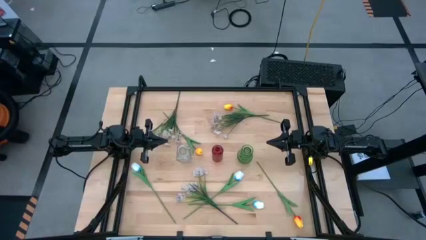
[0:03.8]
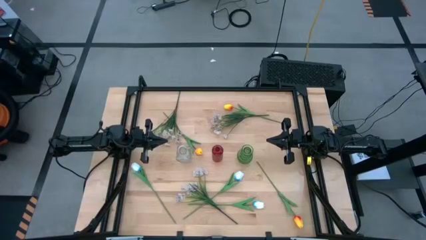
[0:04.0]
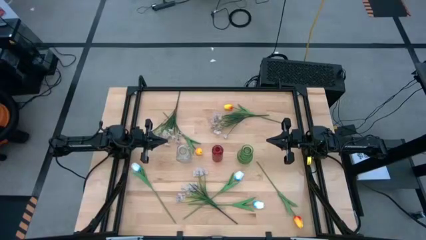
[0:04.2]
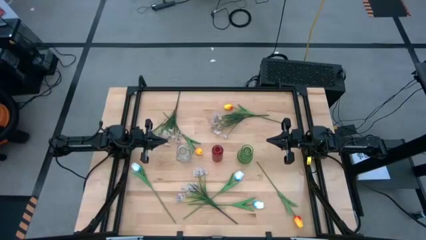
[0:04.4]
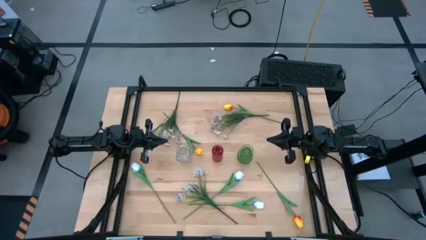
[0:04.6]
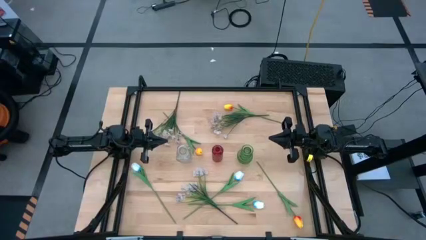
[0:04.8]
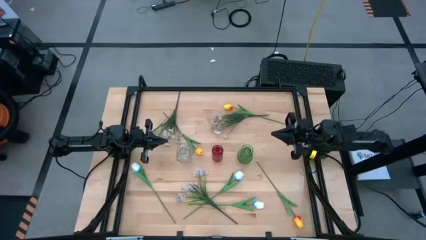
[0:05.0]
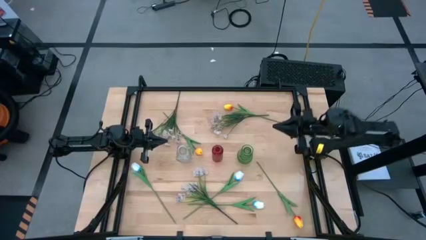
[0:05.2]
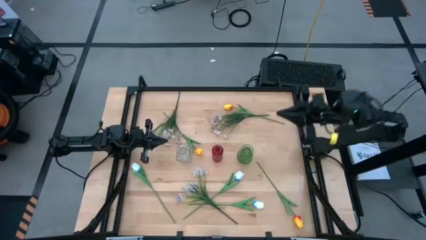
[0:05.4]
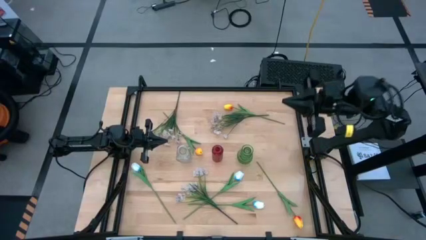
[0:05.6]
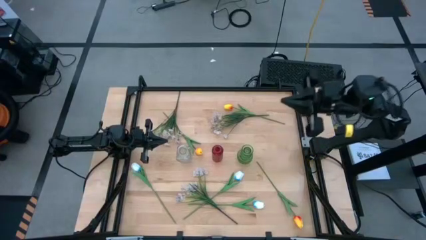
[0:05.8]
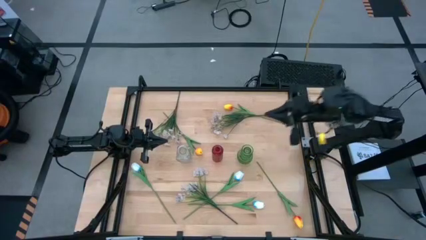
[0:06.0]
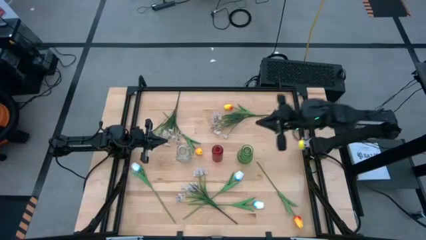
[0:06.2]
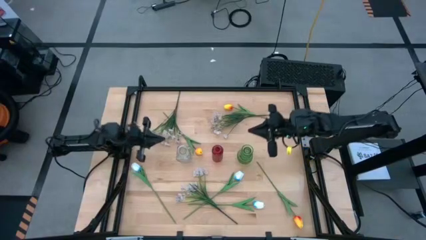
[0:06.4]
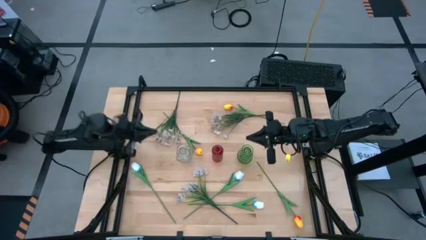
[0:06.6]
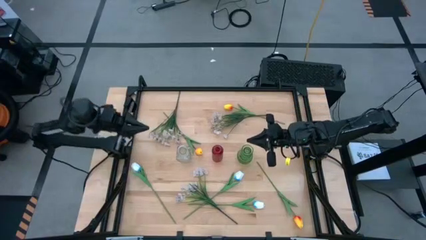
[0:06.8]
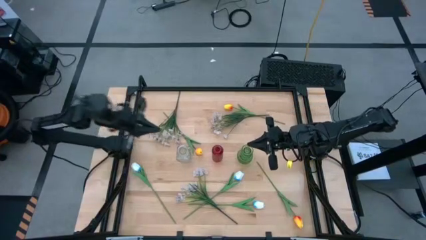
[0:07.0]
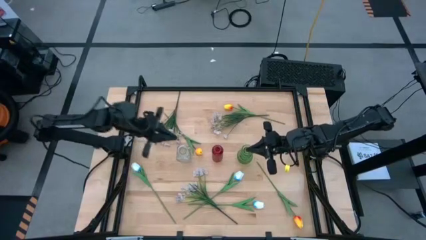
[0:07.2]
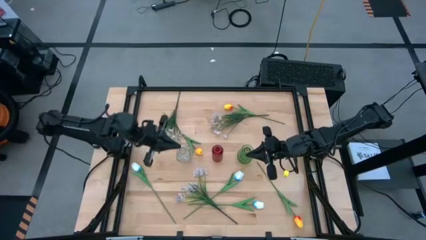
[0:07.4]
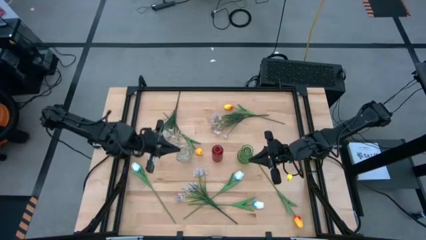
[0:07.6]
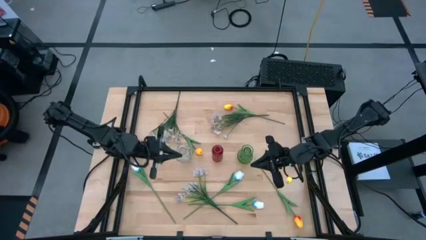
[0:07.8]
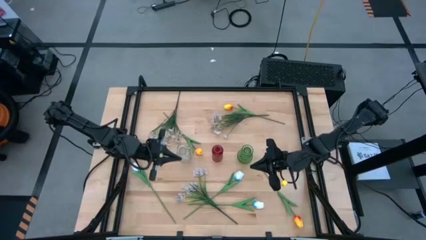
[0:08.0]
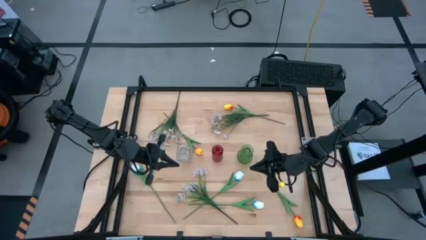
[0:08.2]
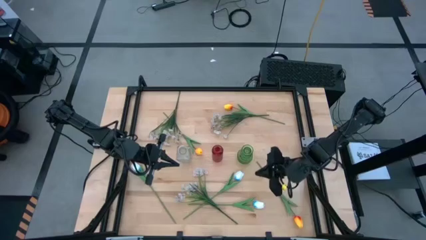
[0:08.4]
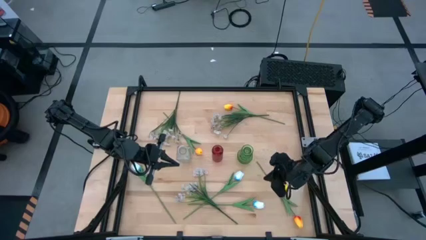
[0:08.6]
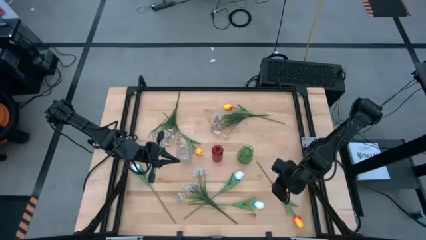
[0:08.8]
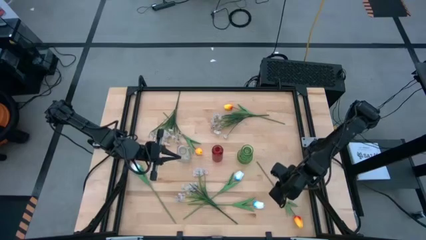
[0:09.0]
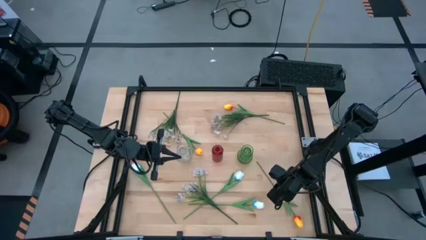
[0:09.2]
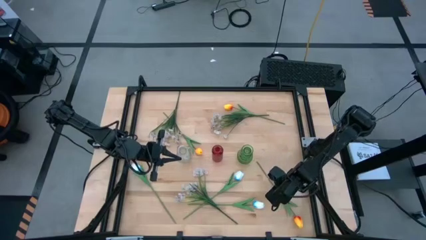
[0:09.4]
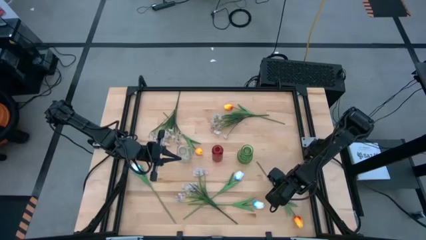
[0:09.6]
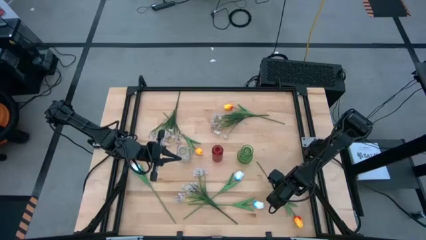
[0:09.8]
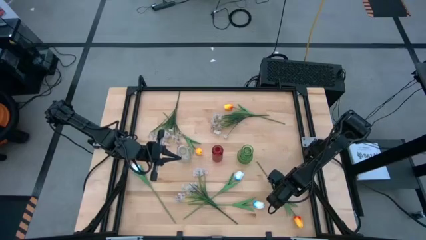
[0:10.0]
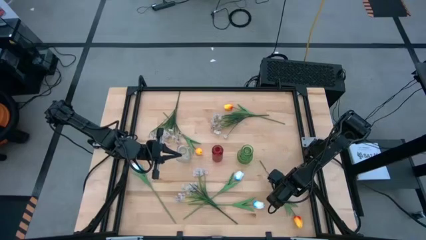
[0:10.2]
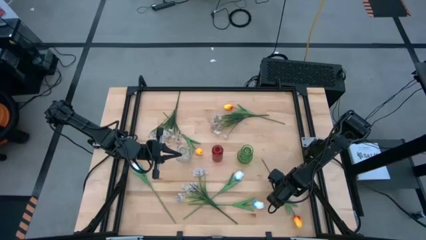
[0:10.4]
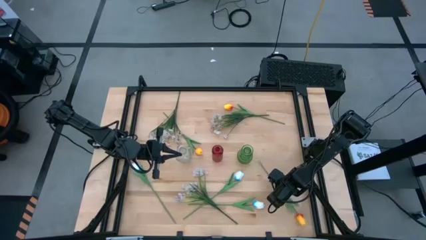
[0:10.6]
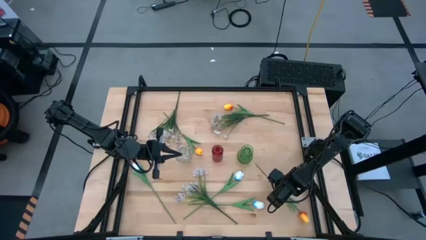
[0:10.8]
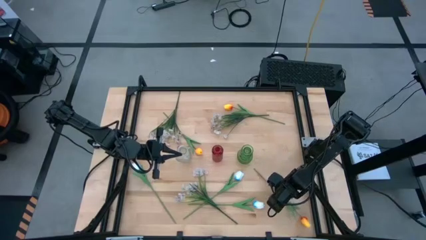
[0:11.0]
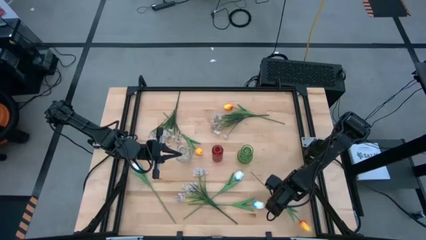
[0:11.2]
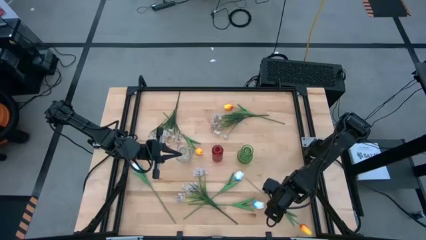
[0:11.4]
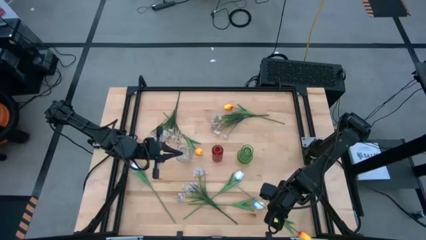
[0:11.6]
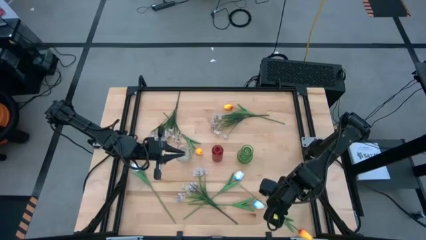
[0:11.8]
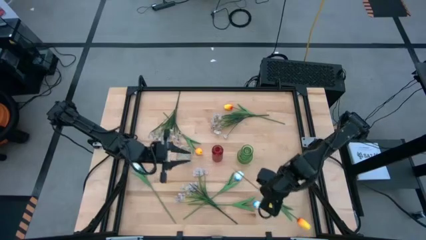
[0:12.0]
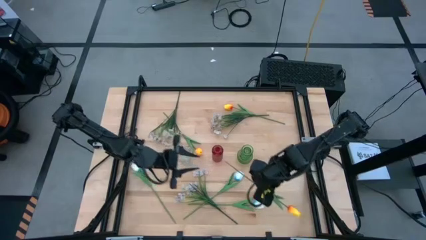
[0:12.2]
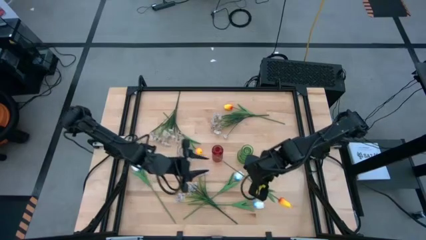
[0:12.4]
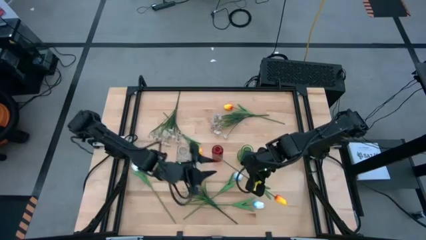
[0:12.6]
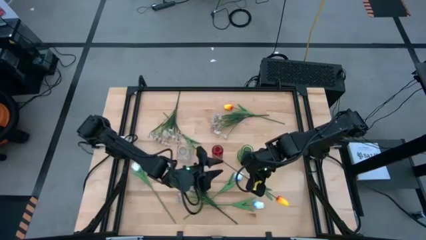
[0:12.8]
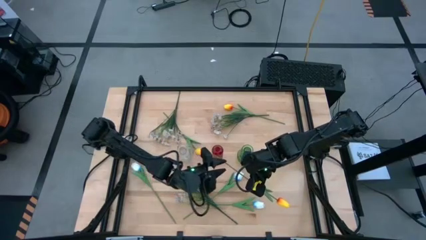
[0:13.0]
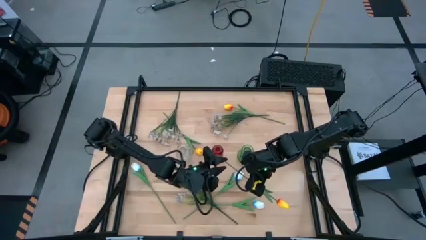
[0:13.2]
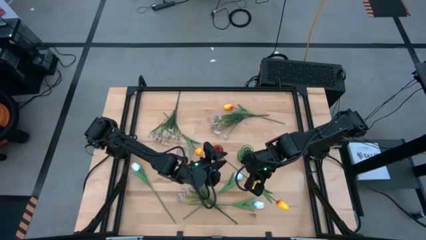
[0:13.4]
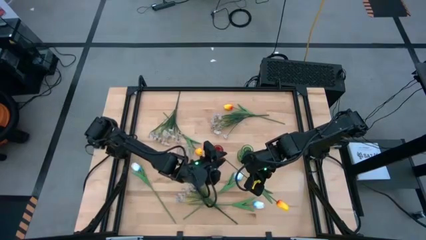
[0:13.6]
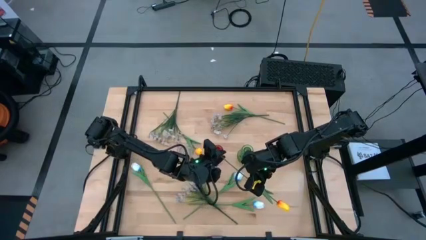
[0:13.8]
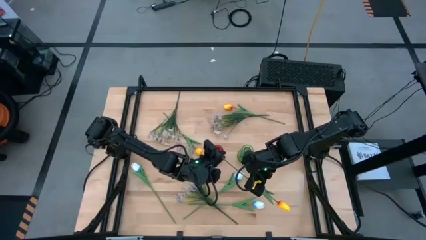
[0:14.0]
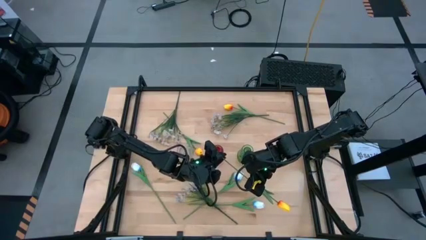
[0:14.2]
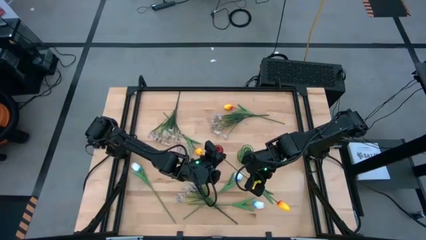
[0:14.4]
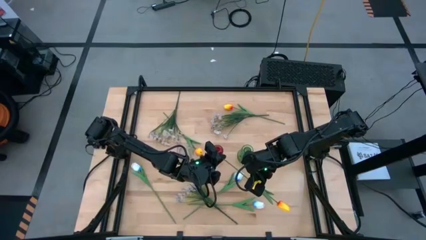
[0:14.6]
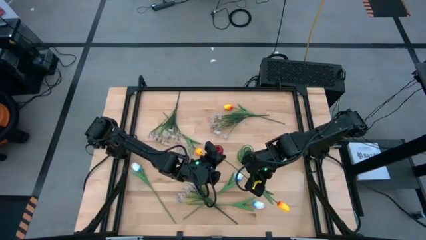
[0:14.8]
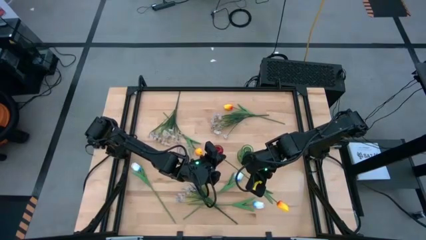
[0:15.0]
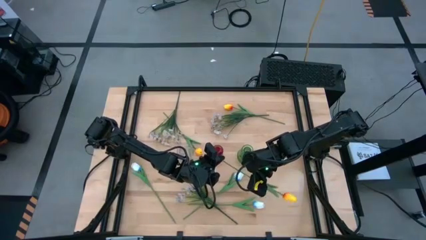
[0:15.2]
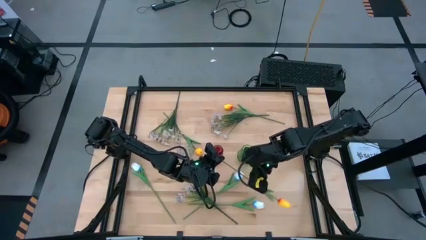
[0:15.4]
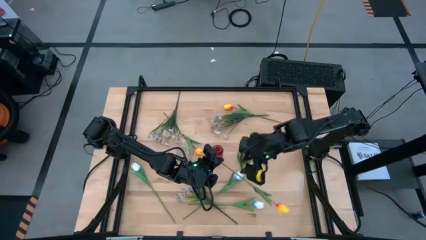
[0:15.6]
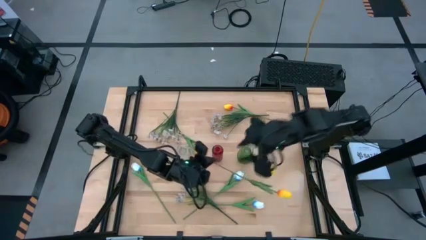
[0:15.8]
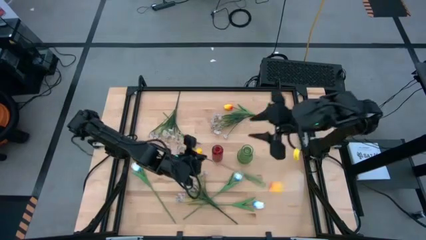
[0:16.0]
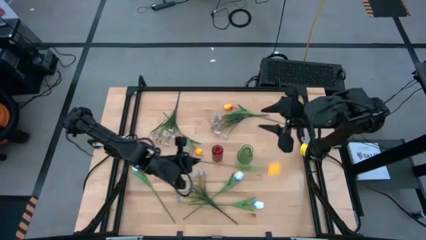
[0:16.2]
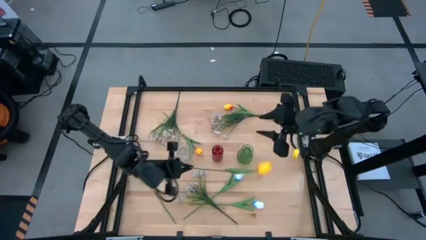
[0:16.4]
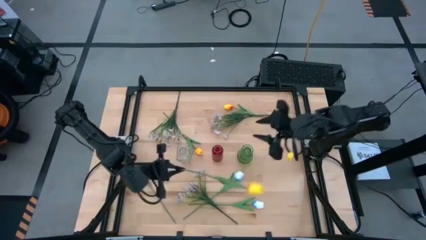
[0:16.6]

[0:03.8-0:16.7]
Task: Sort flowers into vase by color
Put the bottom right yellow tulip into the green vase

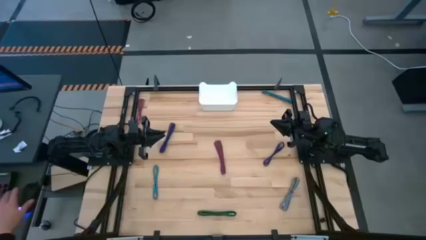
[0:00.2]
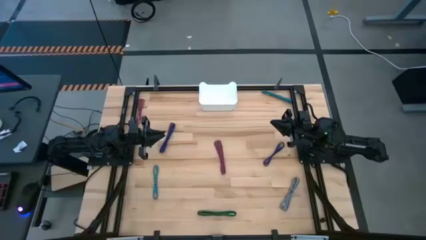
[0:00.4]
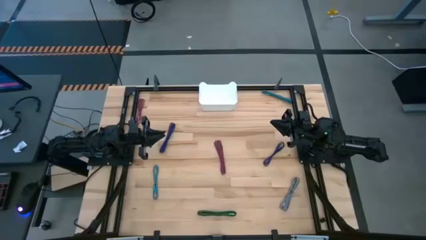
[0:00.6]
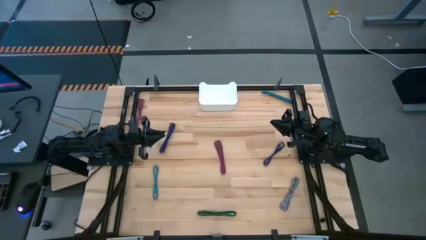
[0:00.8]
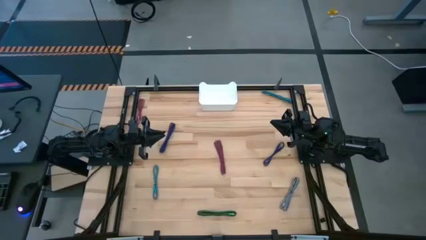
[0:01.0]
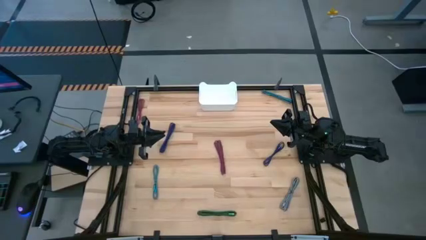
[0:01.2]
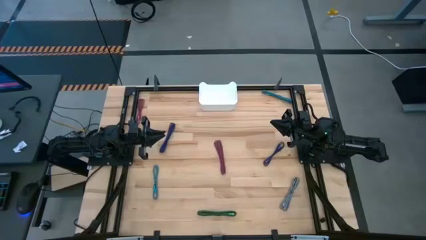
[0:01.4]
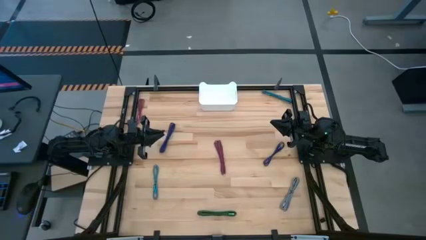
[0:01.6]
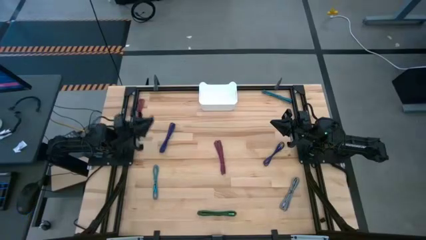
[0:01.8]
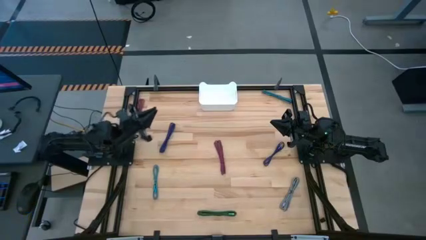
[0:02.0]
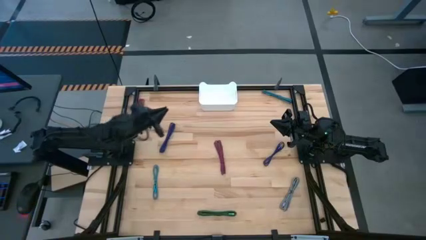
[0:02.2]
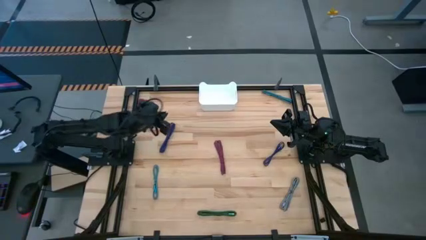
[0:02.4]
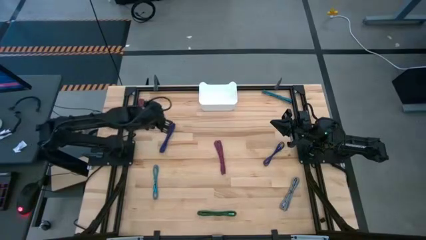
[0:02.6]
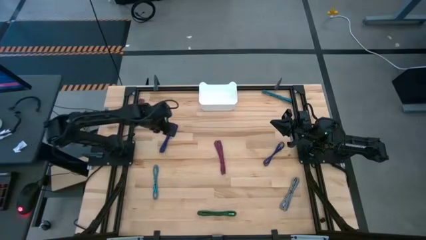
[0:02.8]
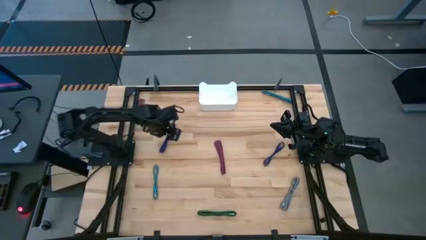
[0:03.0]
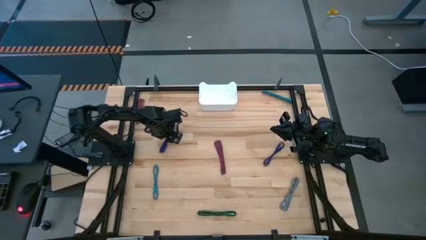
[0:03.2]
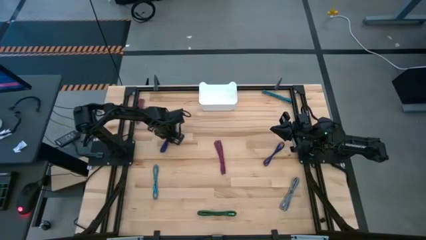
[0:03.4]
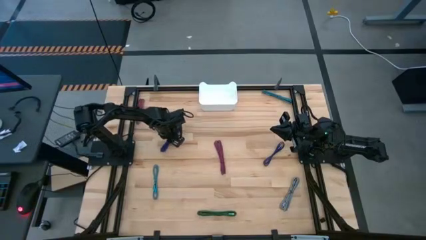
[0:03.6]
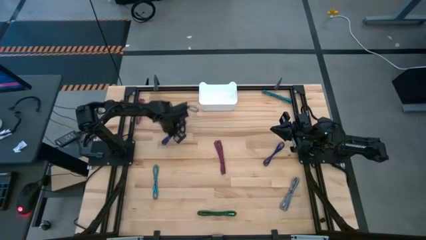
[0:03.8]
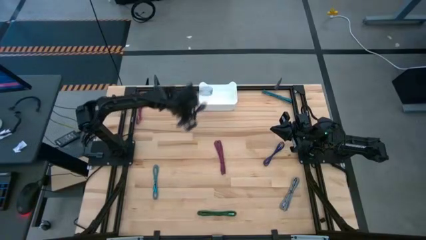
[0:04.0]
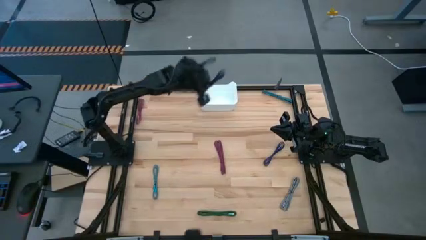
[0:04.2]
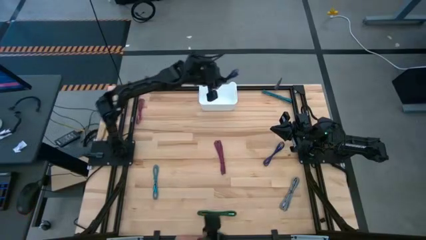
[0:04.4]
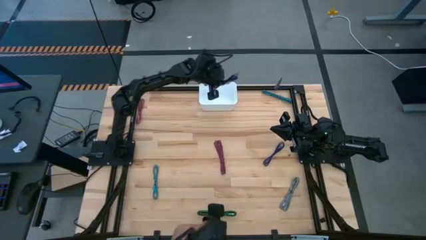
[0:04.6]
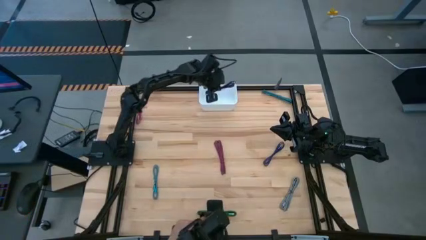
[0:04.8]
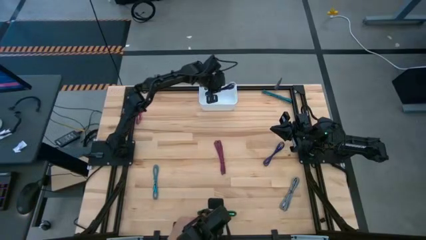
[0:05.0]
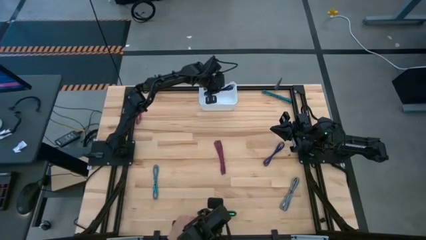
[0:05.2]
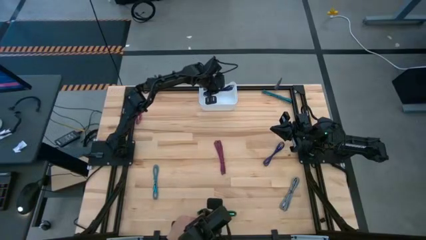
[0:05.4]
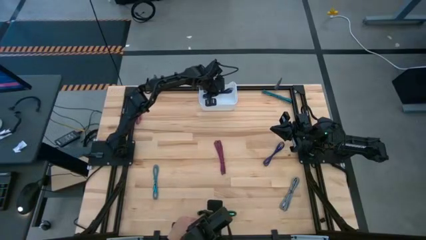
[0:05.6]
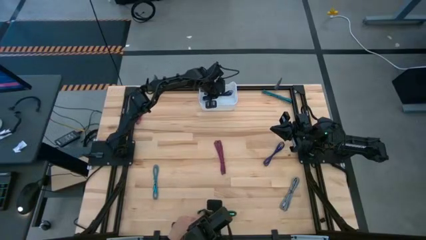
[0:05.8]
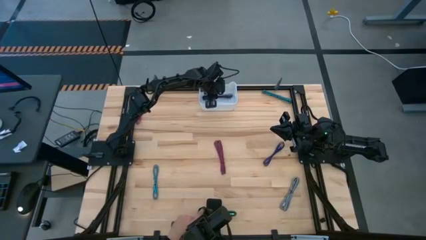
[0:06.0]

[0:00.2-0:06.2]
Task: Pick and place USB-C Cables
Put the left blue charger cable into the white bin
